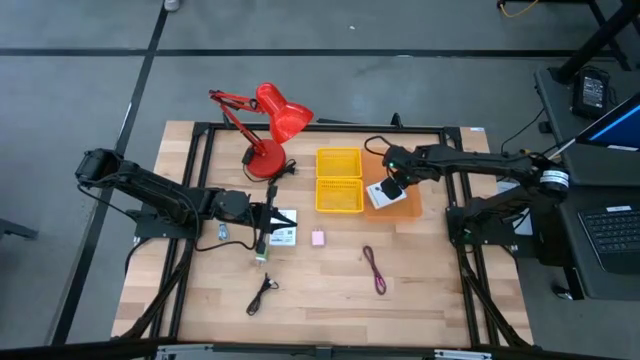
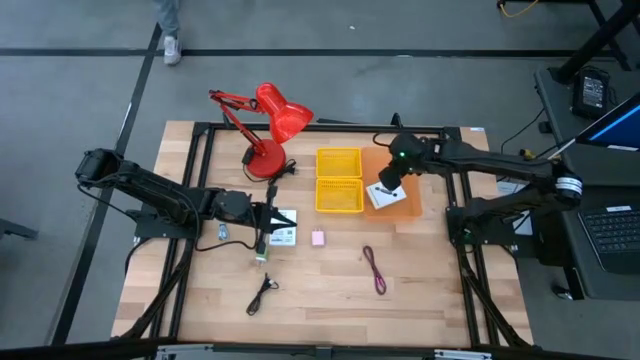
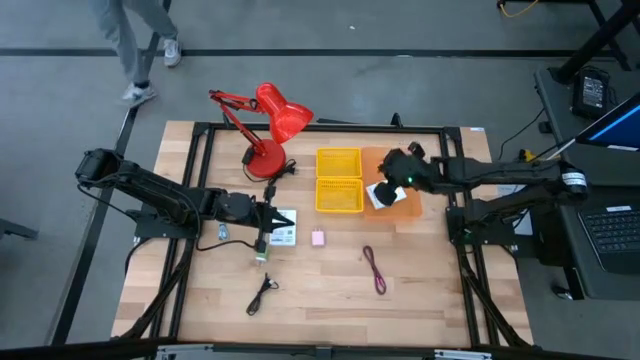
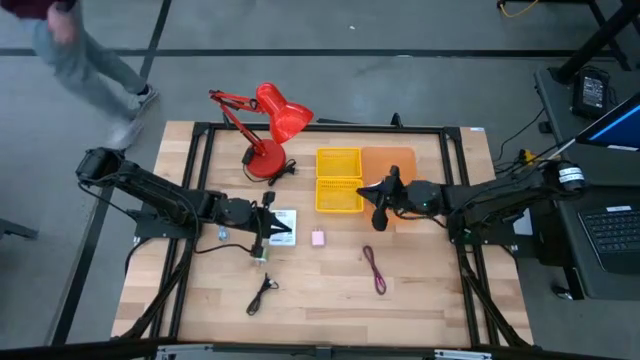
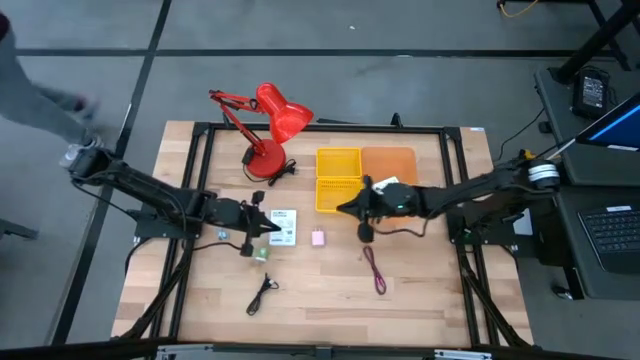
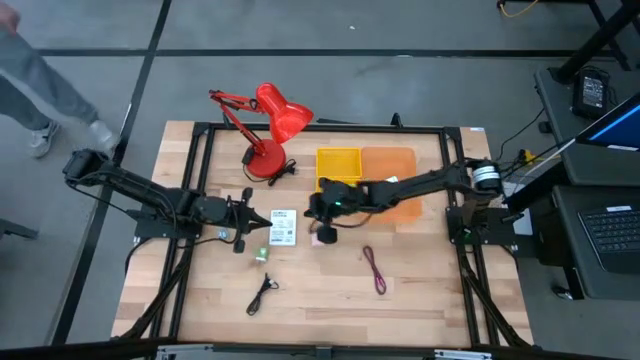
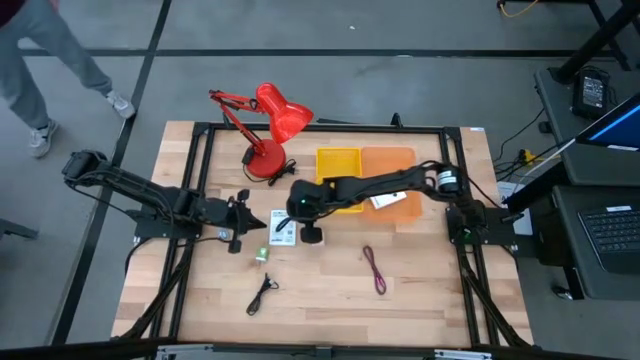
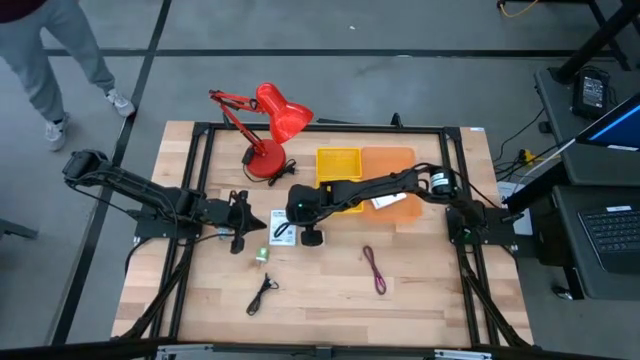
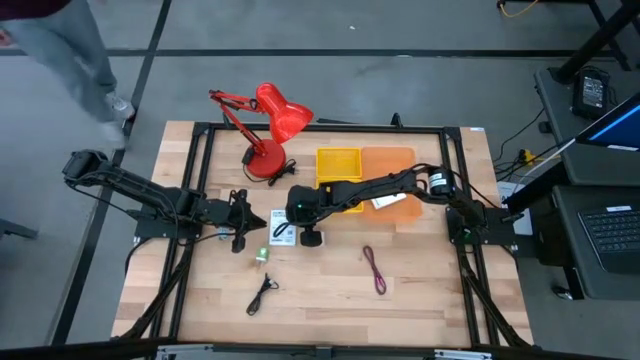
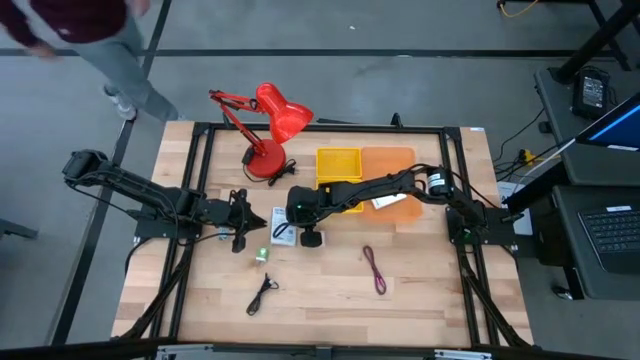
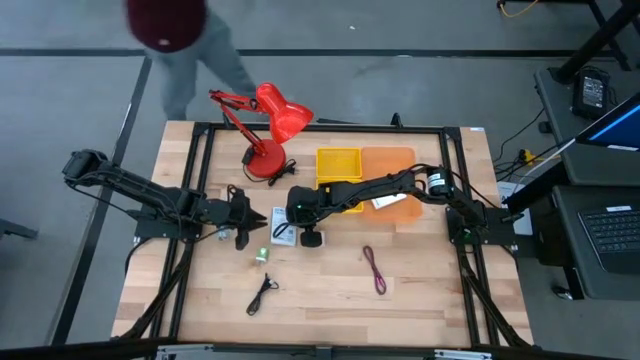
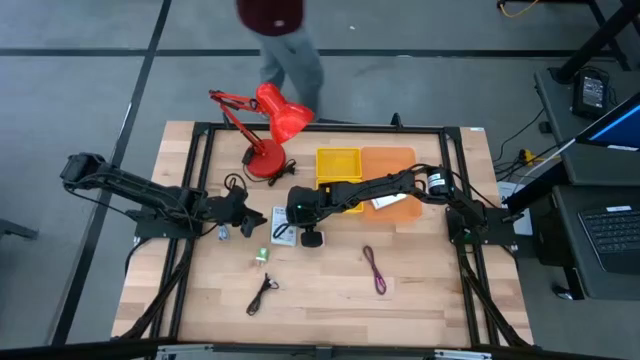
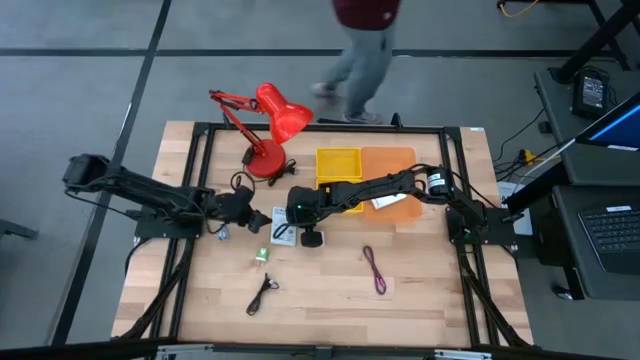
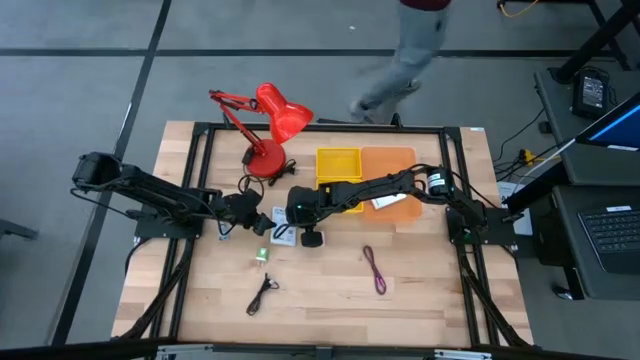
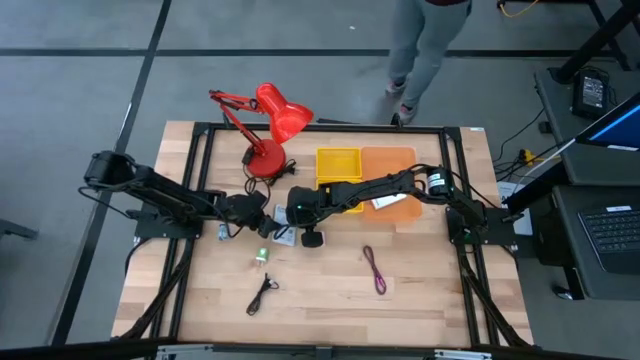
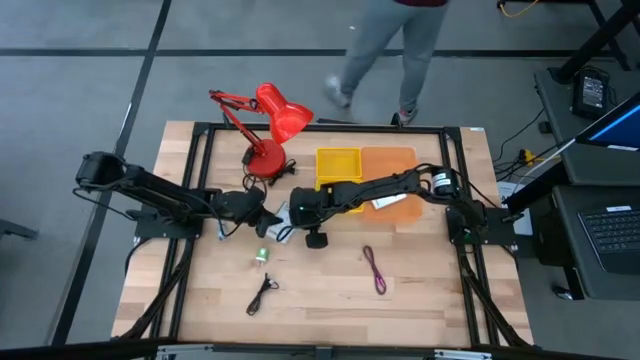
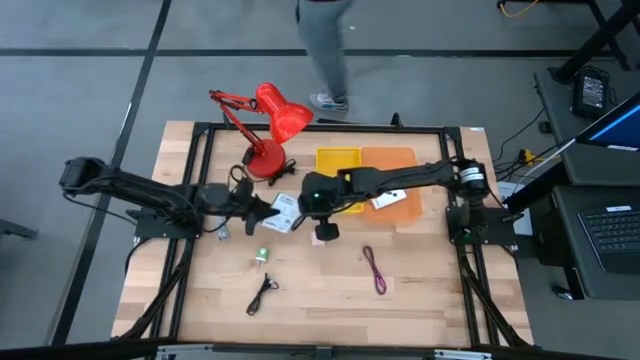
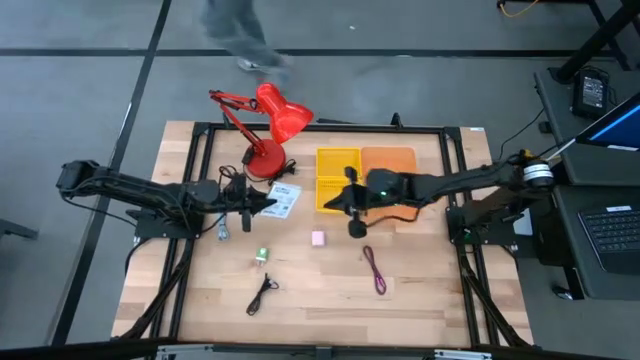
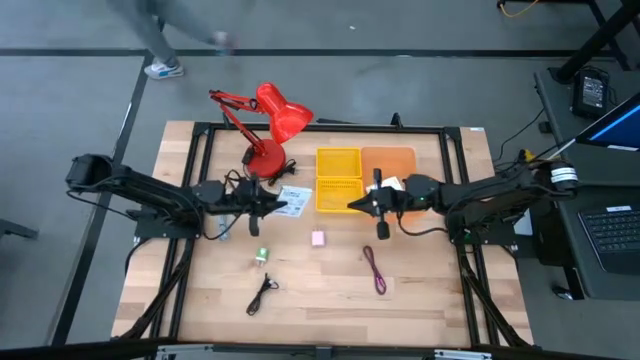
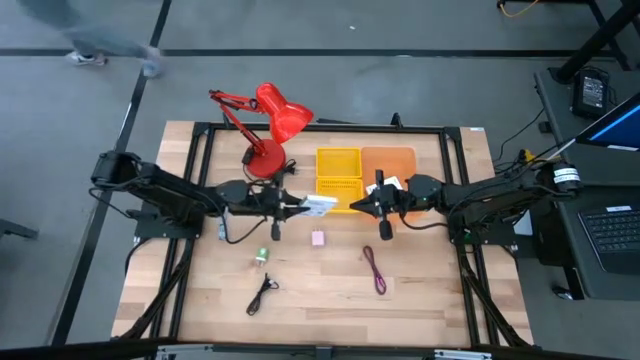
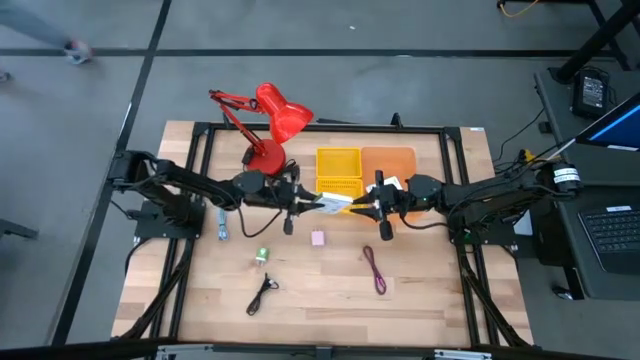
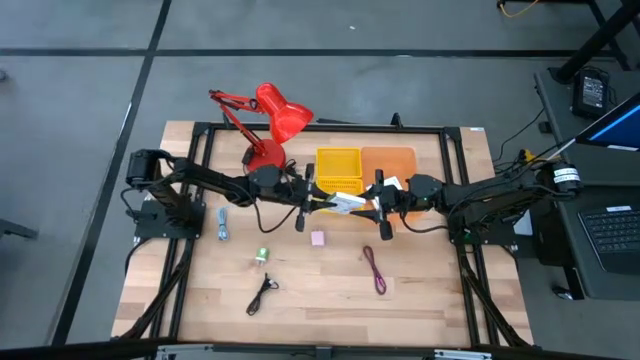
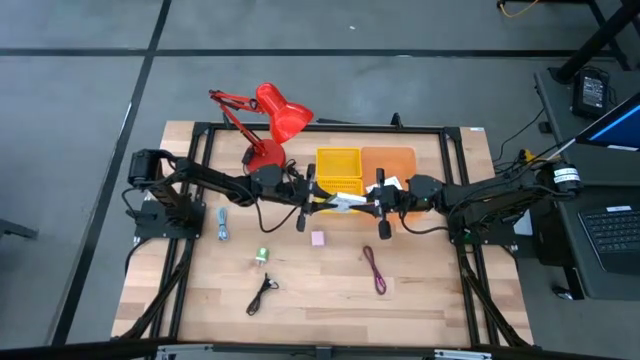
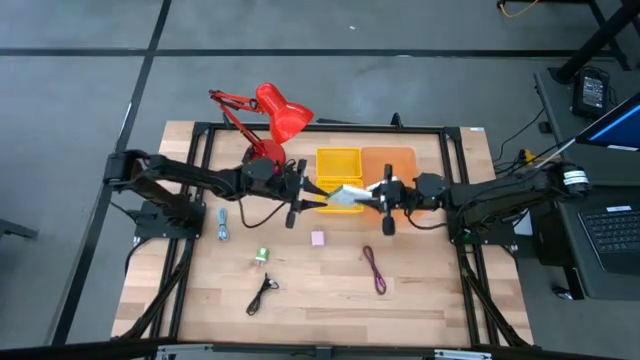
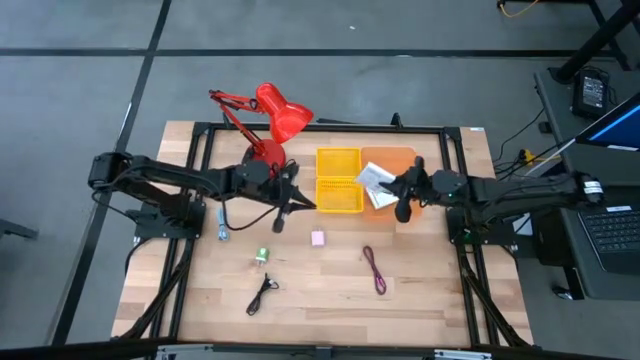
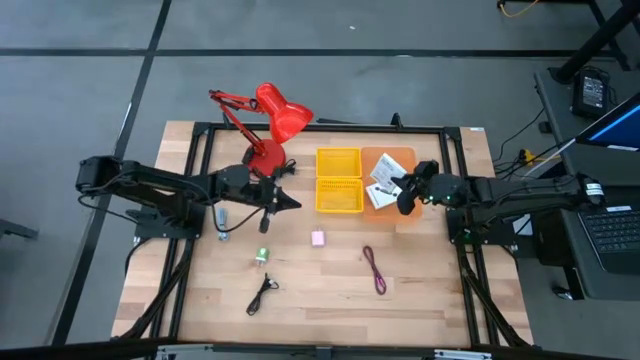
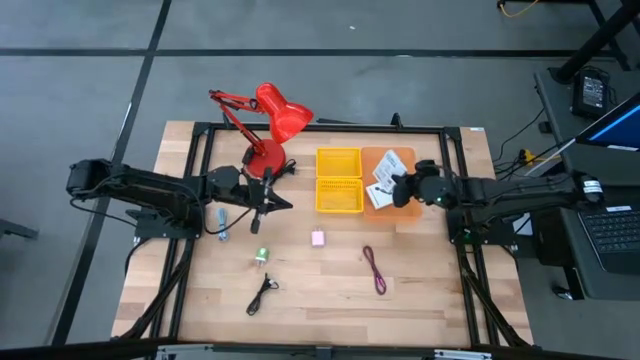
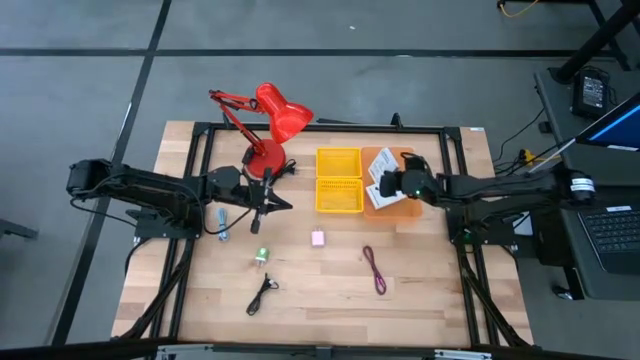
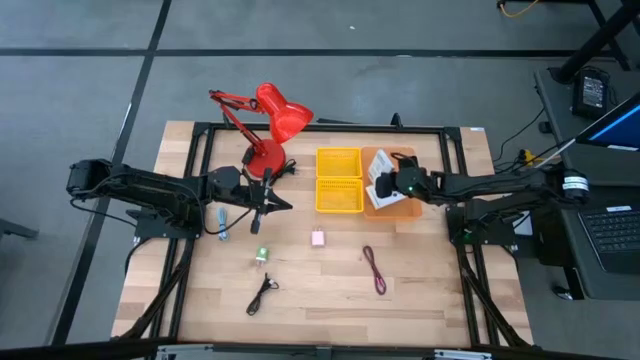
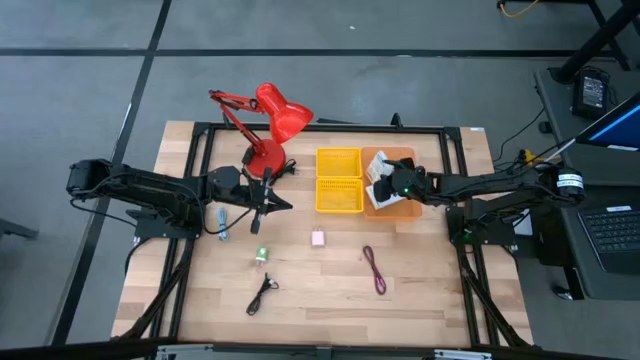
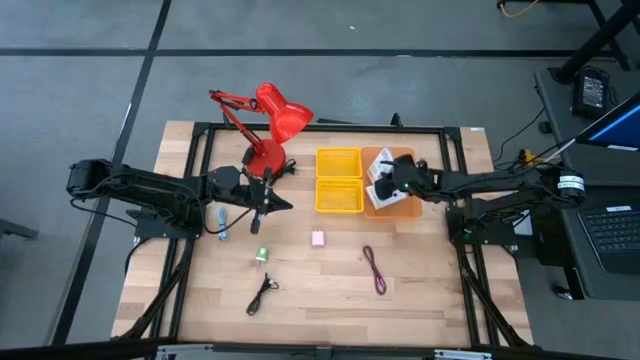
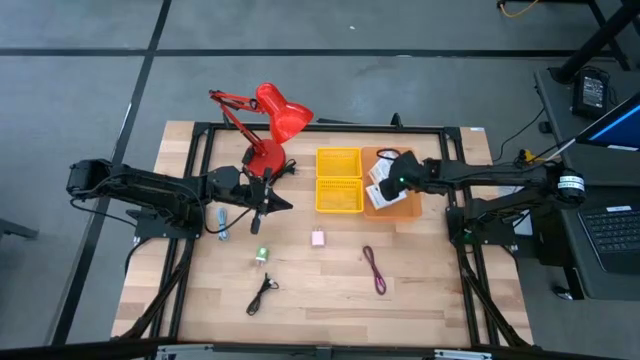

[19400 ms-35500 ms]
Task: Pick and place items into bin
Put the white card reader box into the orange bin

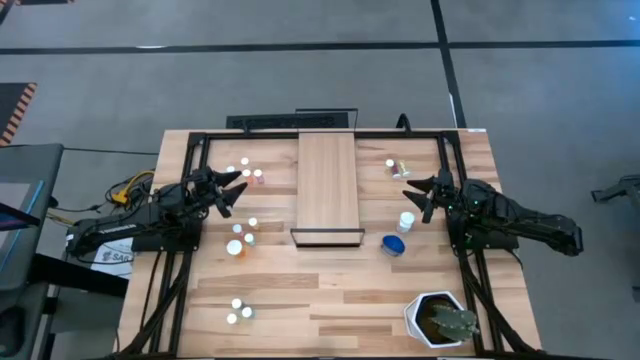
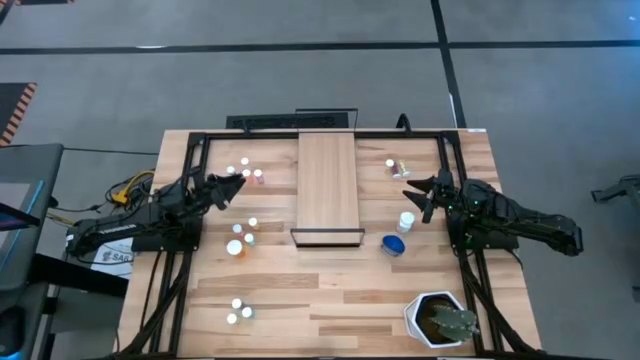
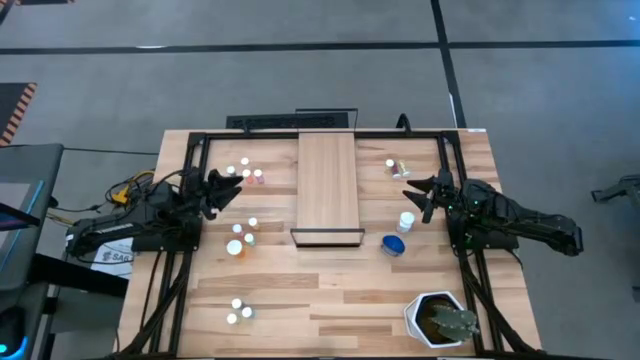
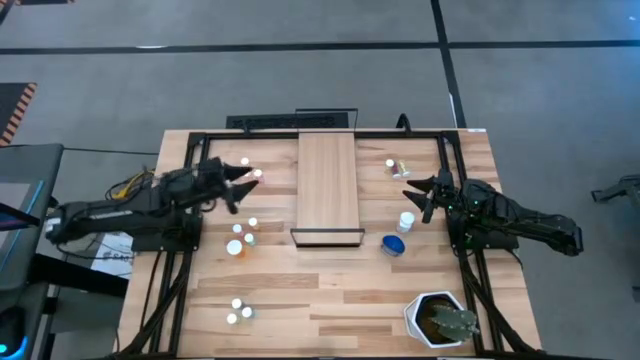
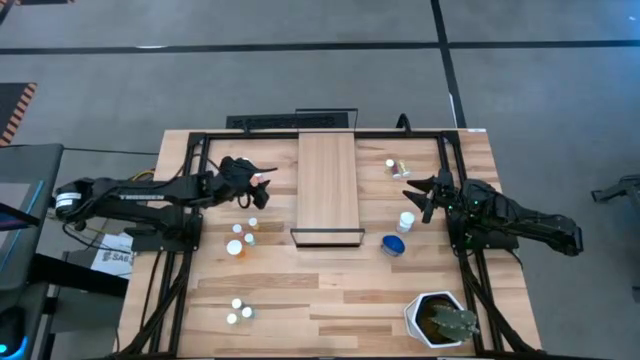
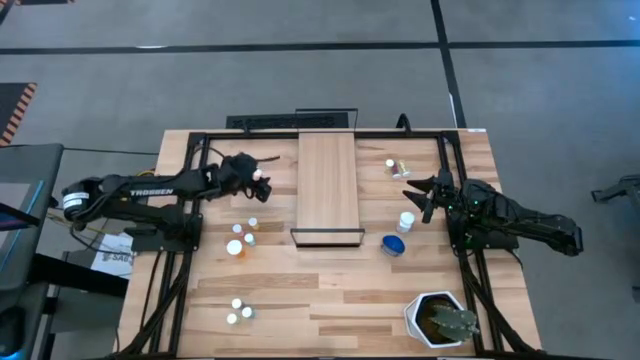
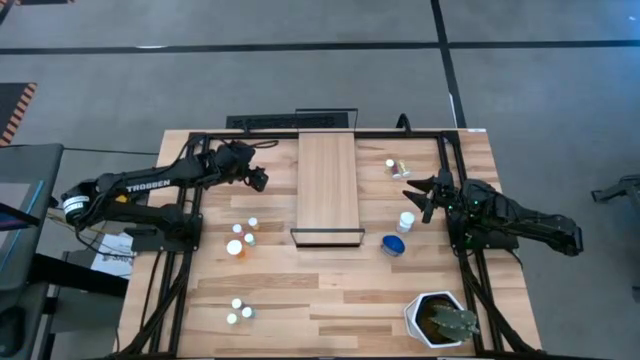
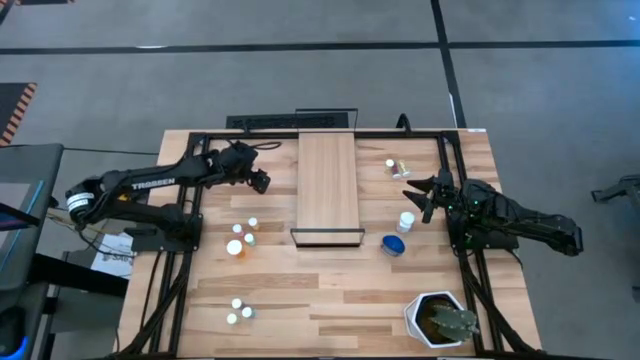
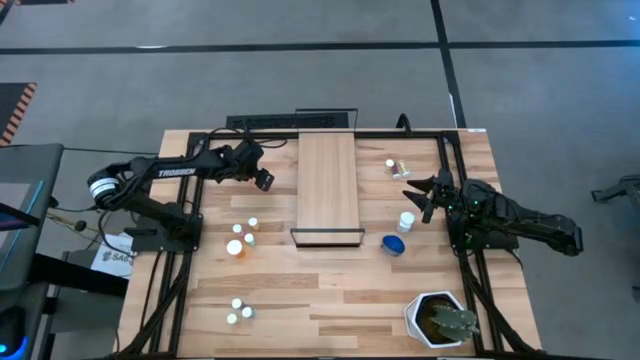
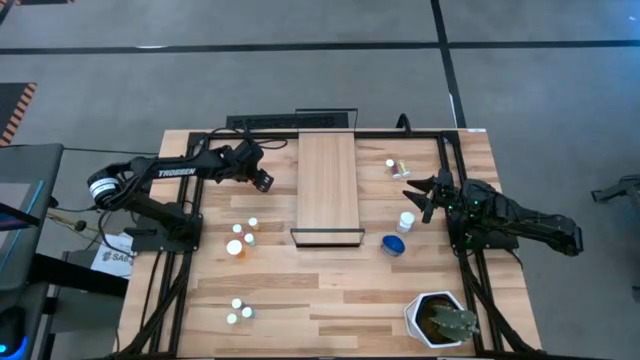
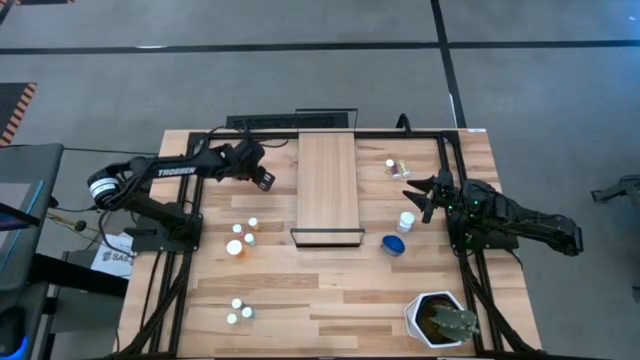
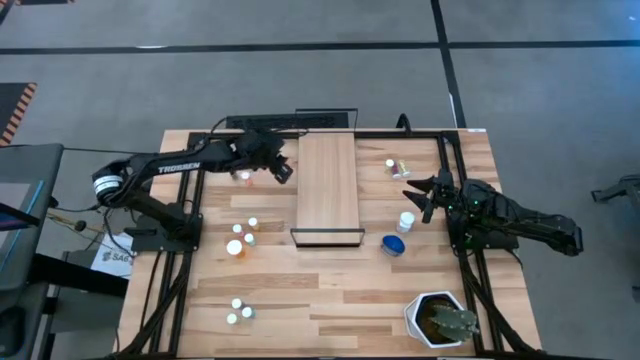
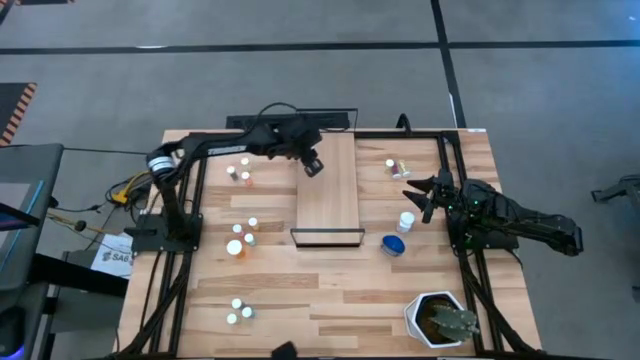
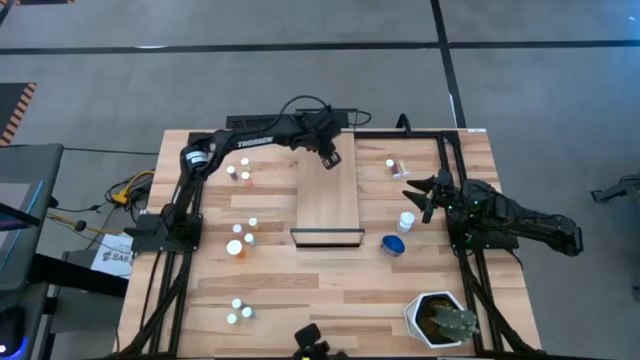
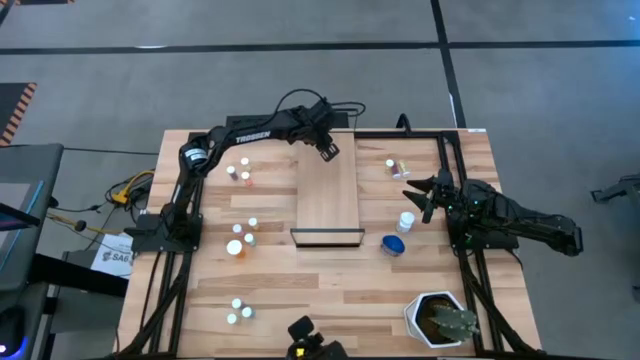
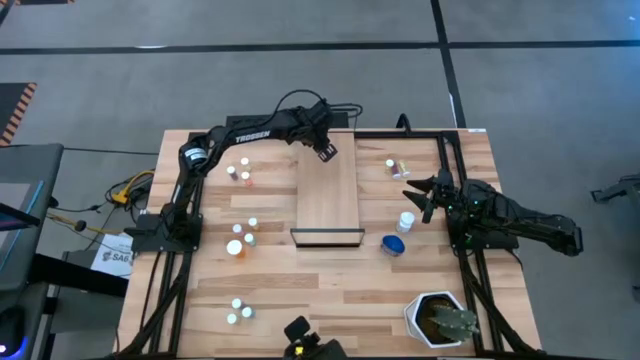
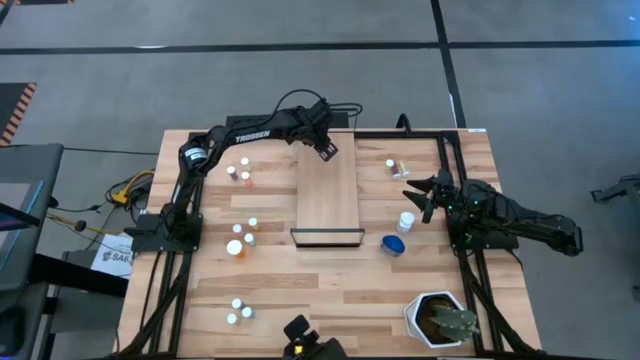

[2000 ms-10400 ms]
Task: Pick and place medicine bottles onto shelf by color
Put the pink pill bottle on the shelf
